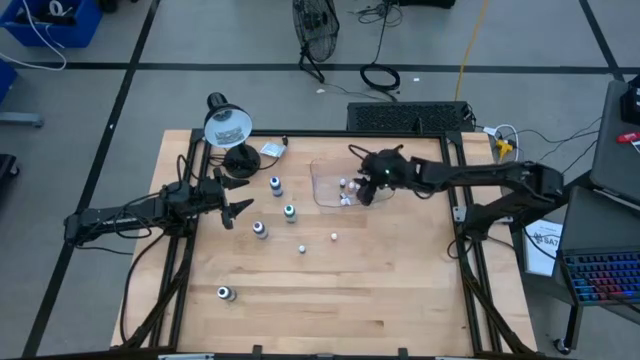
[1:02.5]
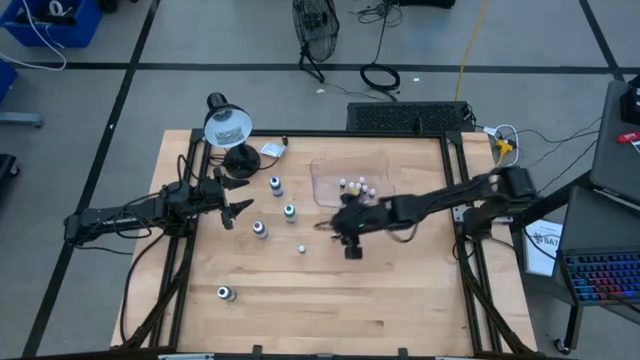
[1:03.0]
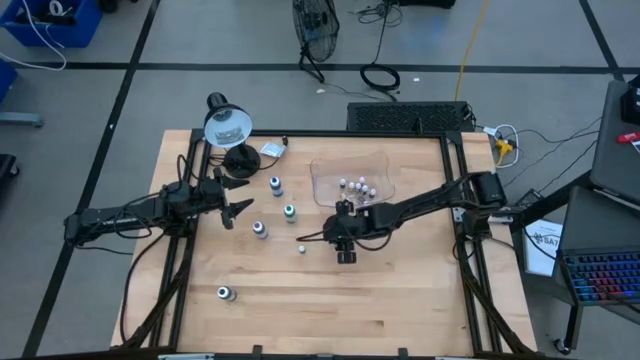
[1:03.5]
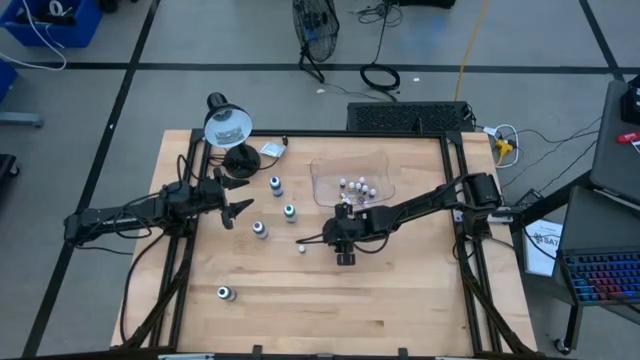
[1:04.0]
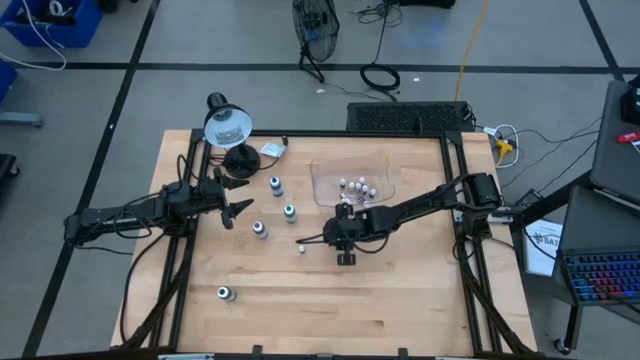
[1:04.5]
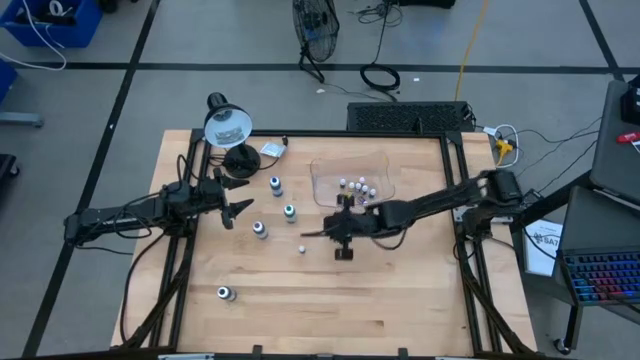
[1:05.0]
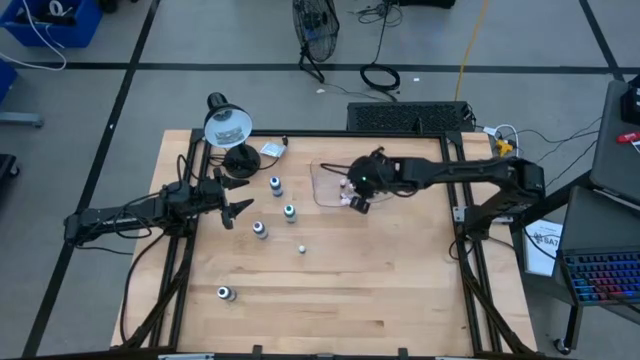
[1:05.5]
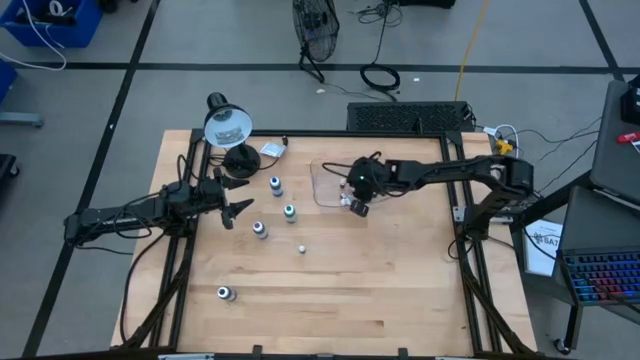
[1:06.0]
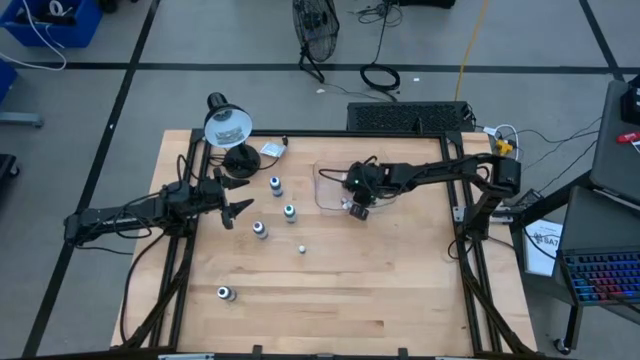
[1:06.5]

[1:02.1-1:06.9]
Task: Pick & Place food coloring
Put the orange food coloring into the transparent bin

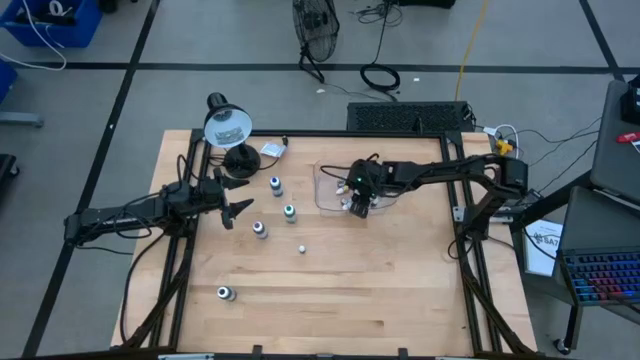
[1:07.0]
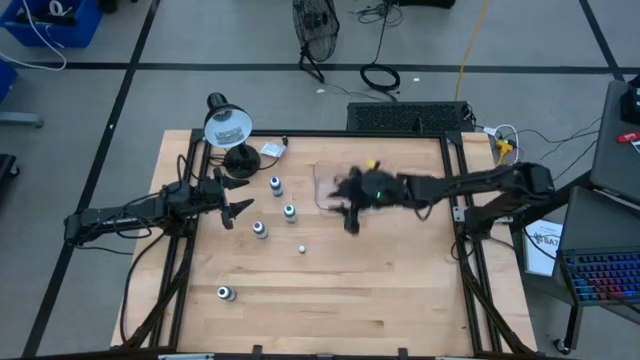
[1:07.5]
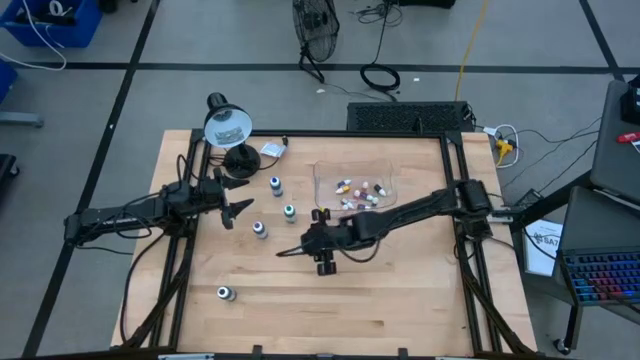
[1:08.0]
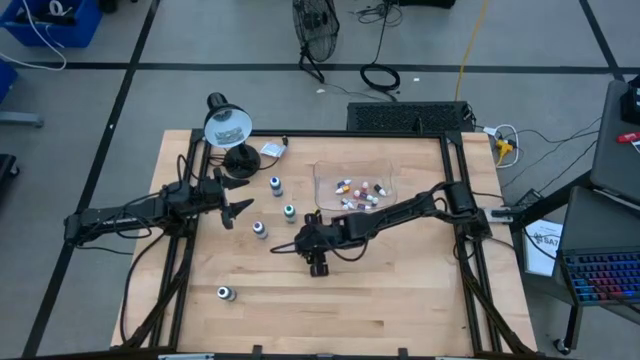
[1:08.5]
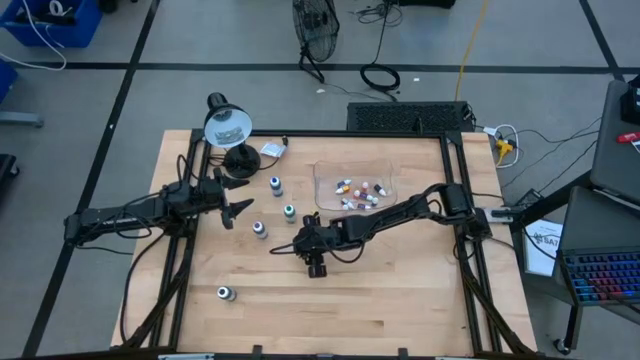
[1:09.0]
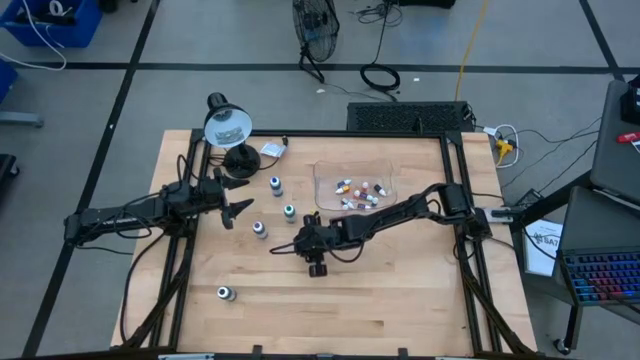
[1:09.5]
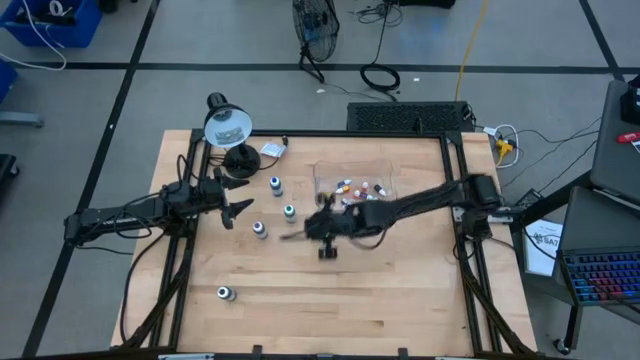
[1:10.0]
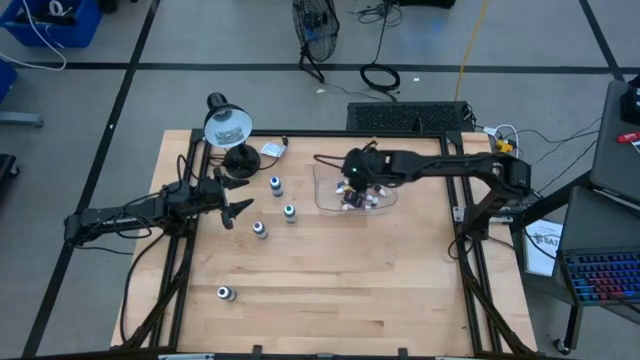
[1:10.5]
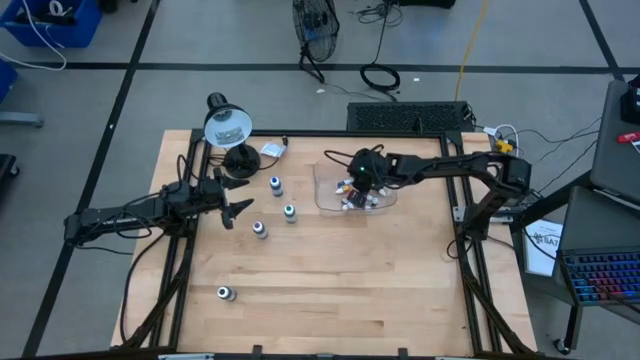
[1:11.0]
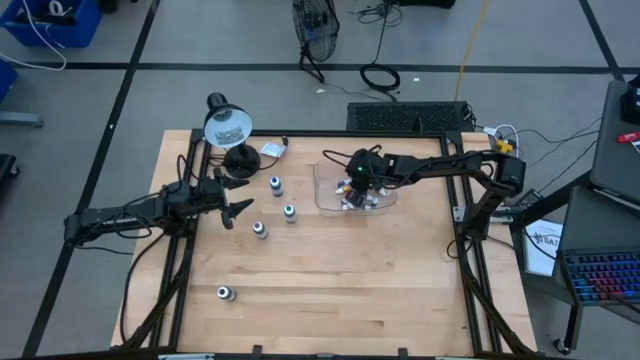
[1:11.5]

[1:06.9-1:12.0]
Put the black food coloring into the transparent bin

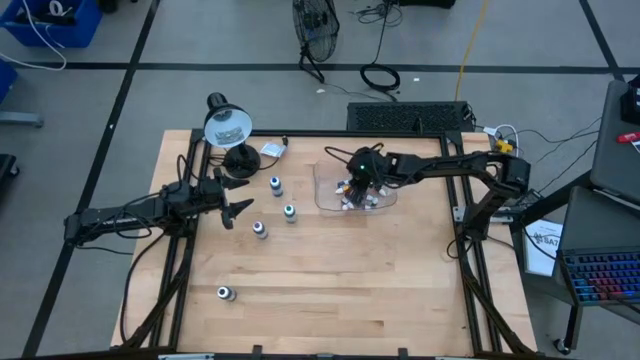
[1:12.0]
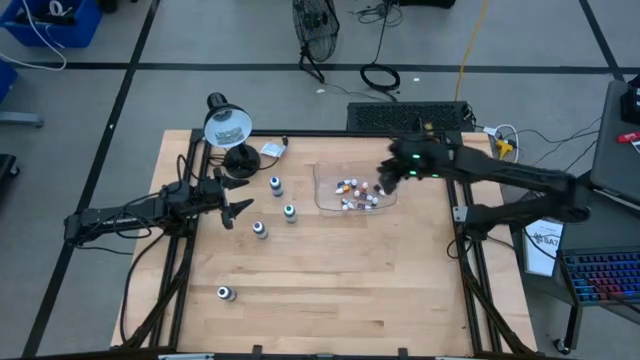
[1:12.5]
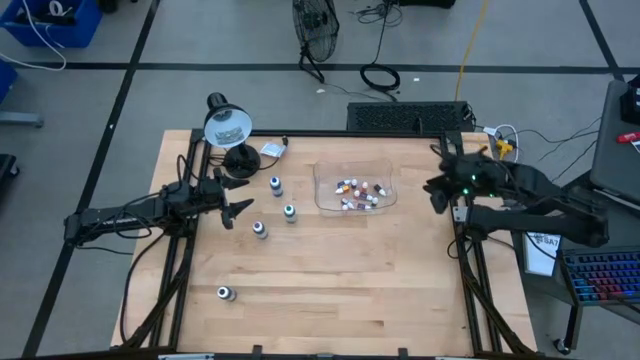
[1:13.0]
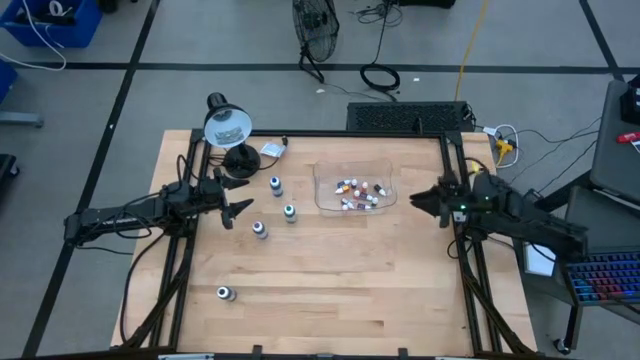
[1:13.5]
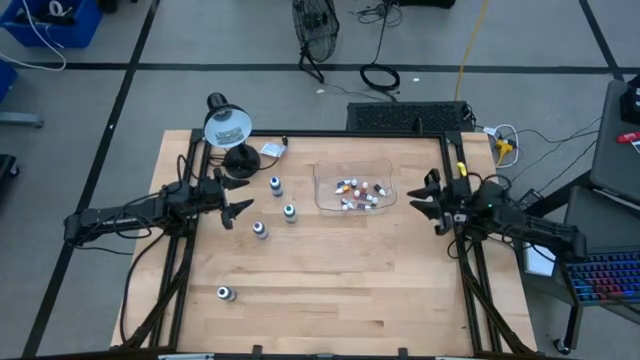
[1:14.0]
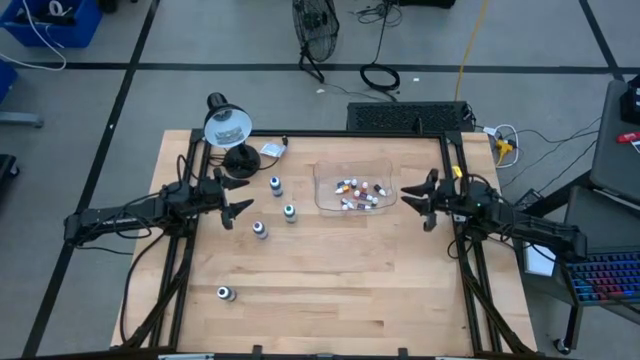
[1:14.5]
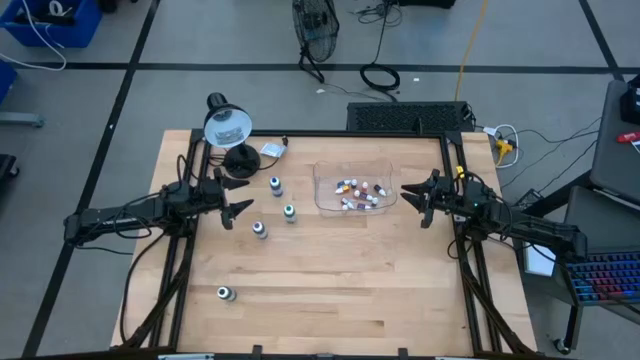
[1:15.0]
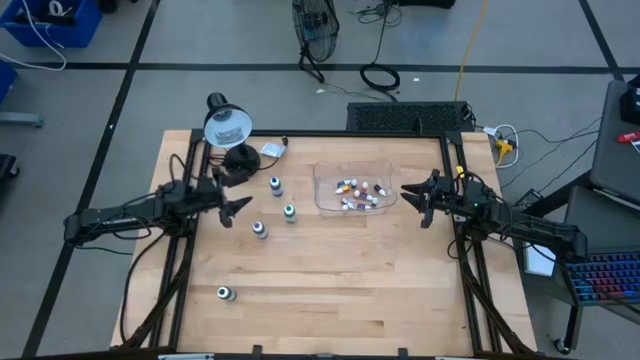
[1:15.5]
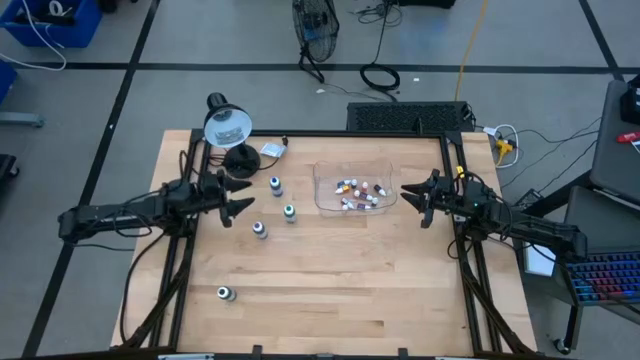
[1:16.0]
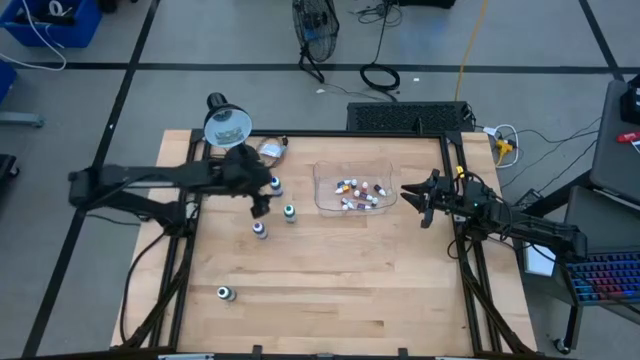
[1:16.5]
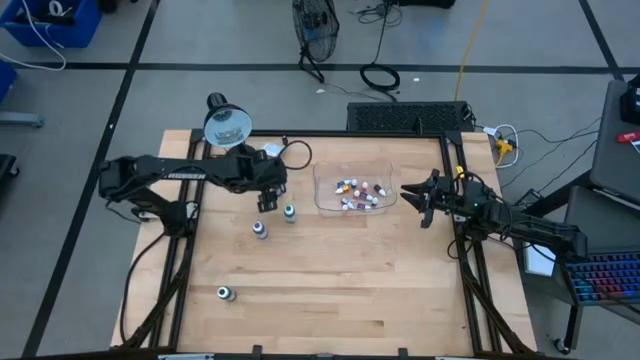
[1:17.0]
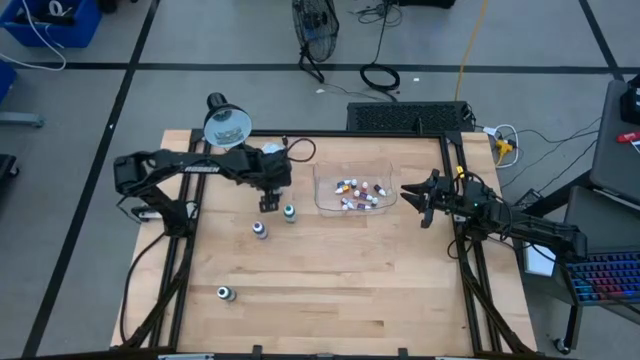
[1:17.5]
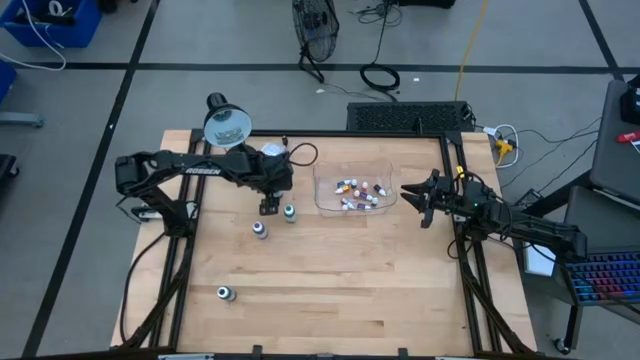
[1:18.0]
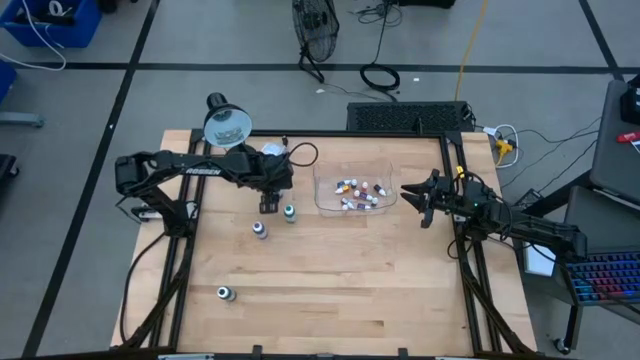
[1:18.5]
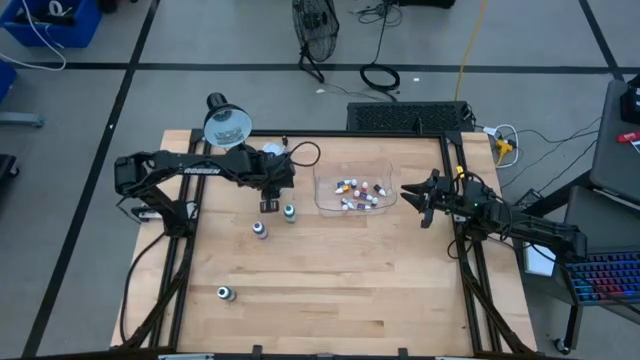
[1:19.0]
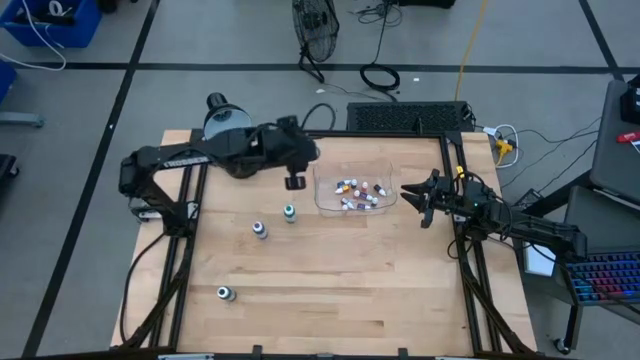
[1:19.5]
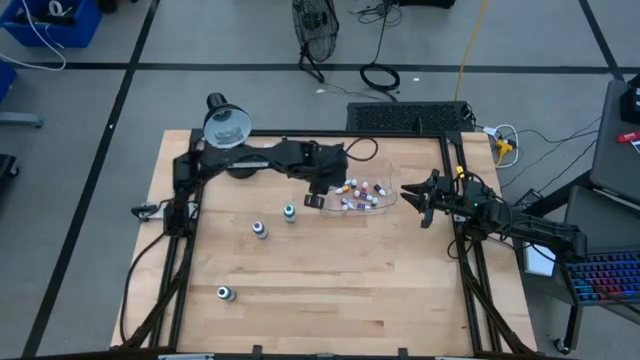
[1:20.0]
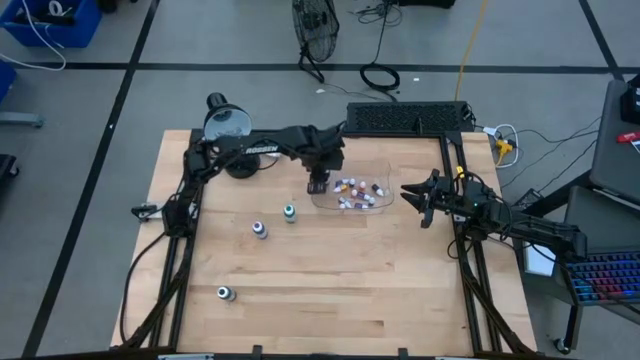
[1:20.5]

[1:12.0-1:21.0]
Put the blue big food coloring into the transparent bin
